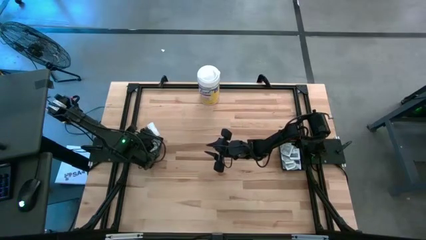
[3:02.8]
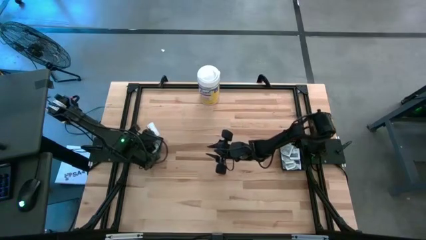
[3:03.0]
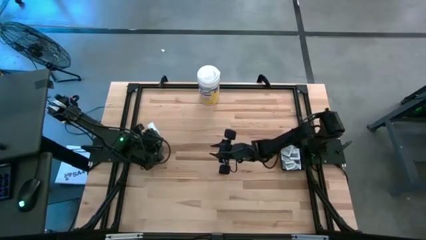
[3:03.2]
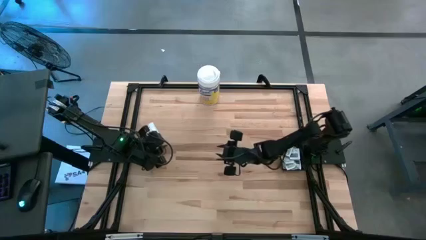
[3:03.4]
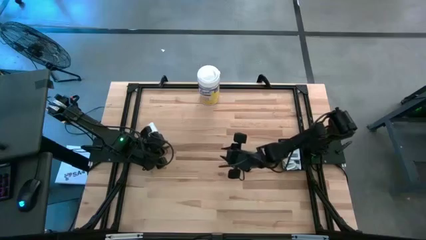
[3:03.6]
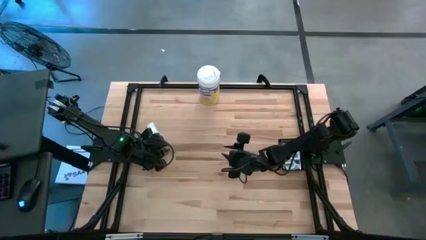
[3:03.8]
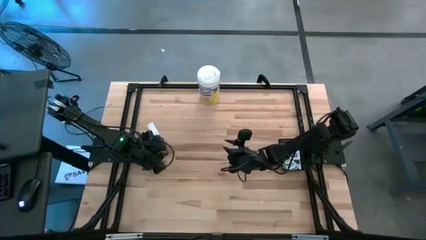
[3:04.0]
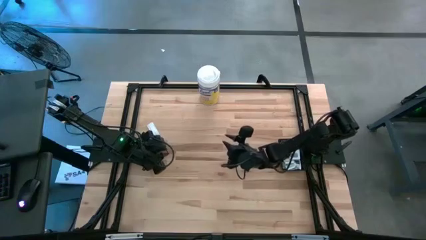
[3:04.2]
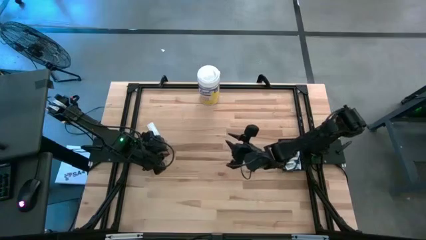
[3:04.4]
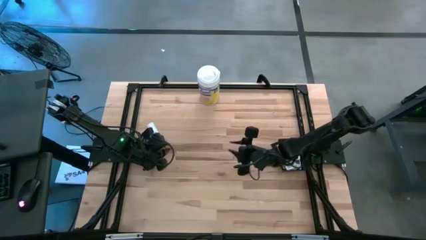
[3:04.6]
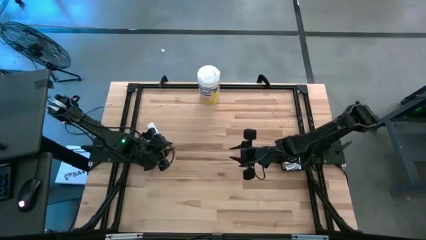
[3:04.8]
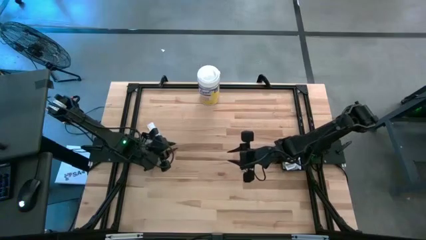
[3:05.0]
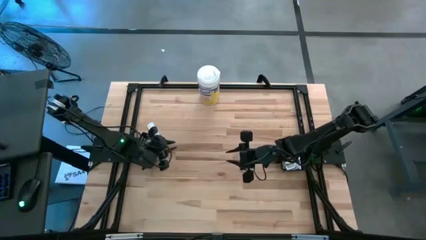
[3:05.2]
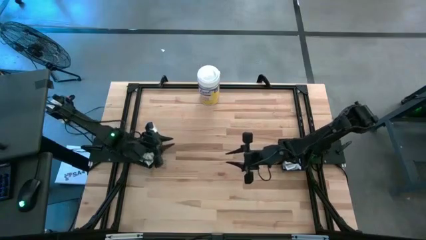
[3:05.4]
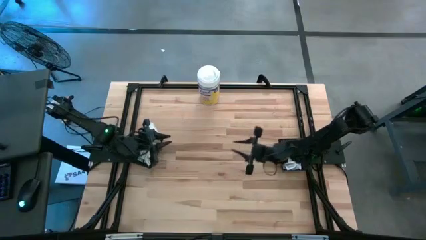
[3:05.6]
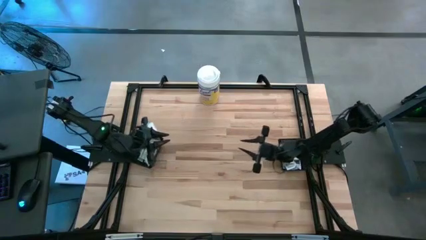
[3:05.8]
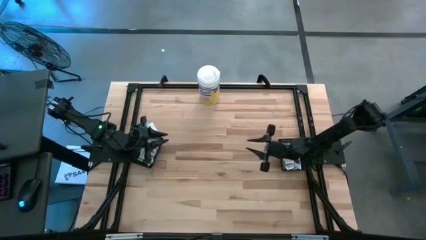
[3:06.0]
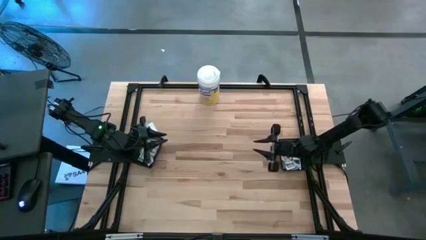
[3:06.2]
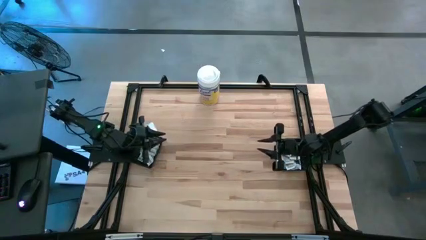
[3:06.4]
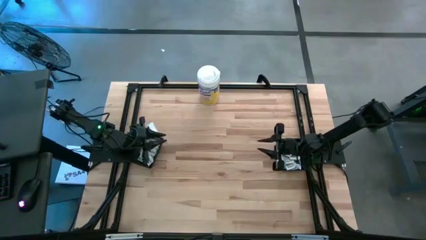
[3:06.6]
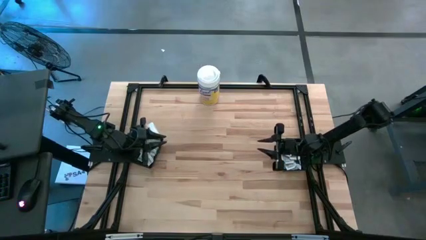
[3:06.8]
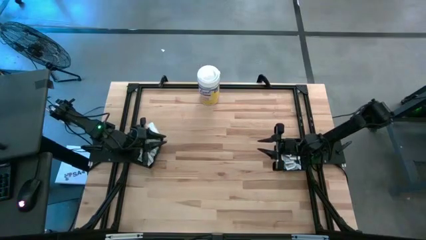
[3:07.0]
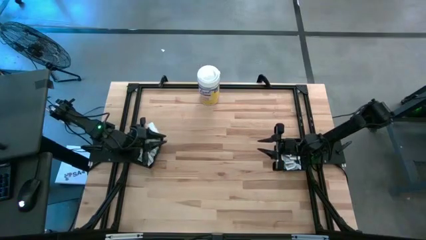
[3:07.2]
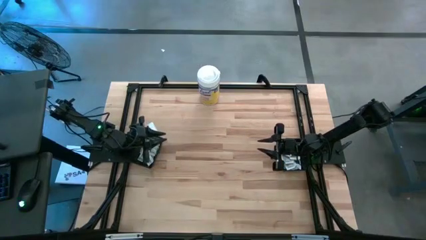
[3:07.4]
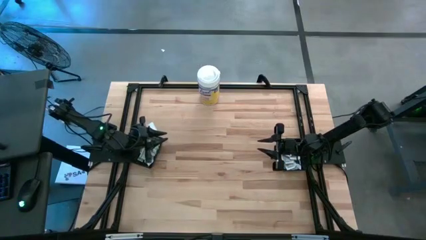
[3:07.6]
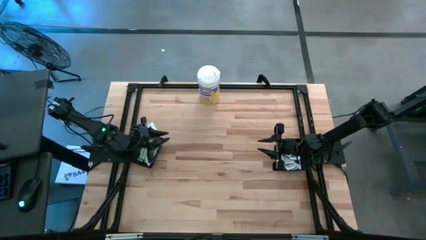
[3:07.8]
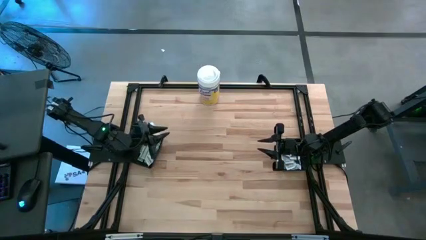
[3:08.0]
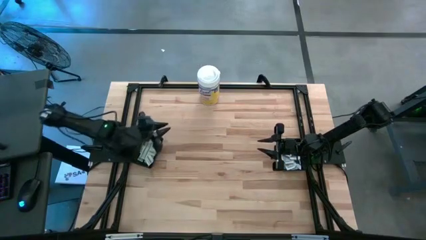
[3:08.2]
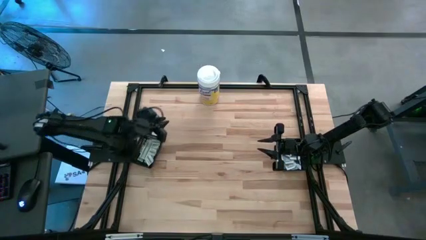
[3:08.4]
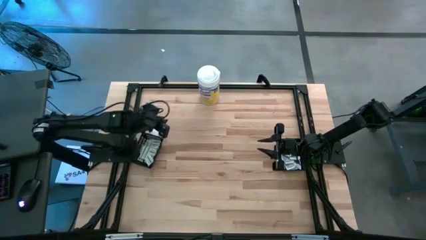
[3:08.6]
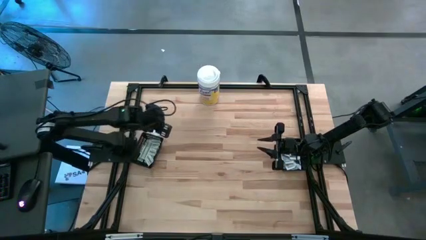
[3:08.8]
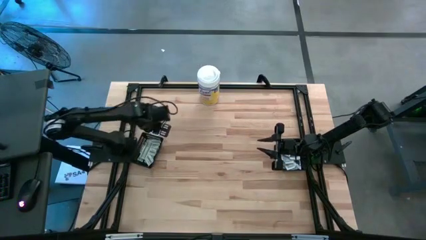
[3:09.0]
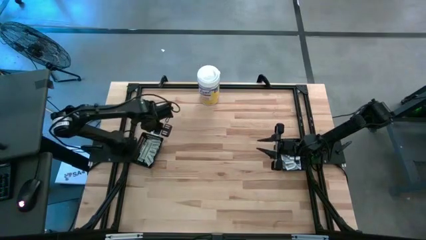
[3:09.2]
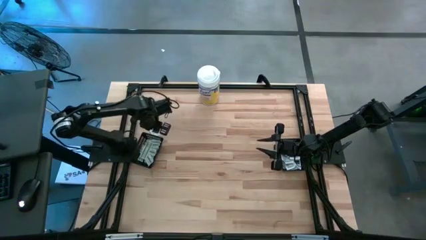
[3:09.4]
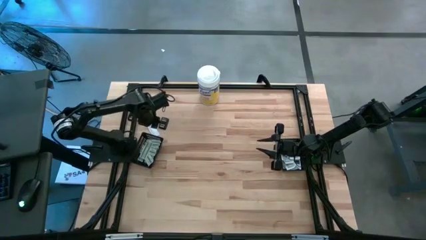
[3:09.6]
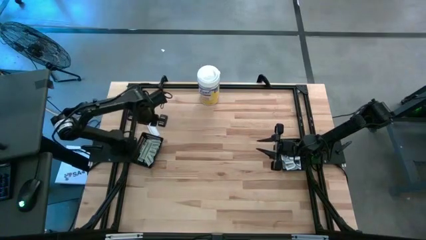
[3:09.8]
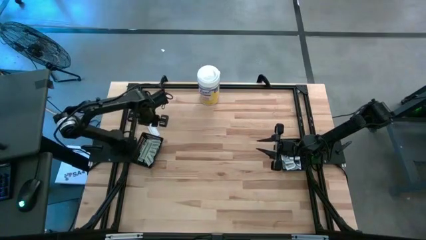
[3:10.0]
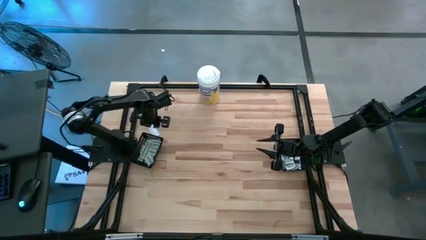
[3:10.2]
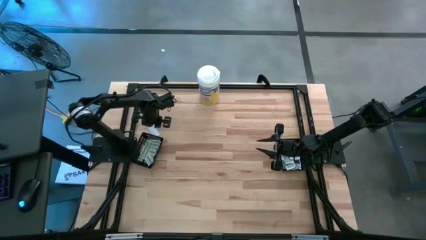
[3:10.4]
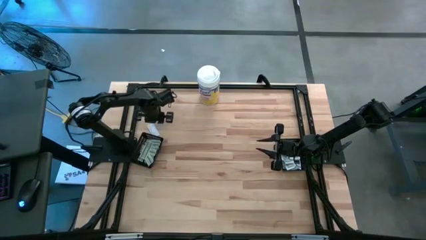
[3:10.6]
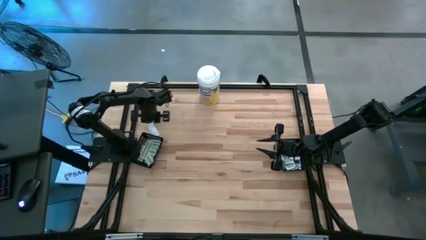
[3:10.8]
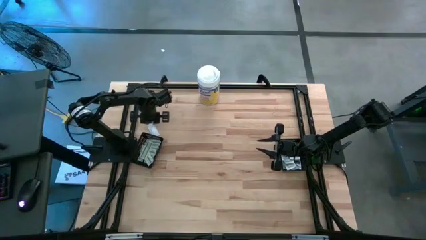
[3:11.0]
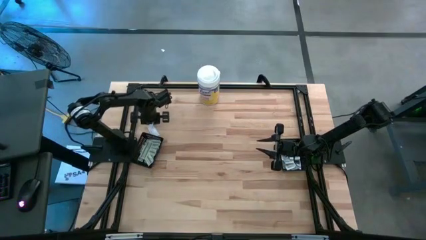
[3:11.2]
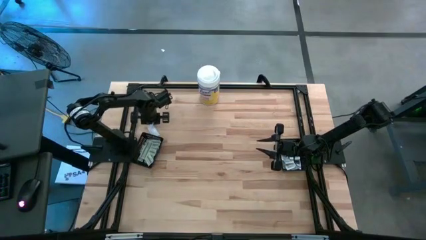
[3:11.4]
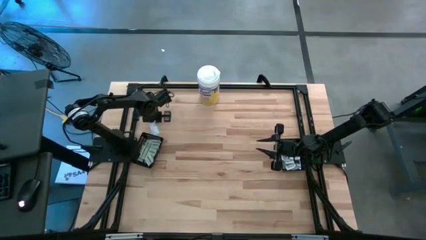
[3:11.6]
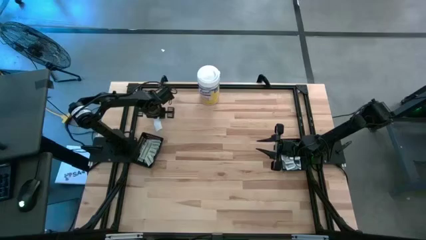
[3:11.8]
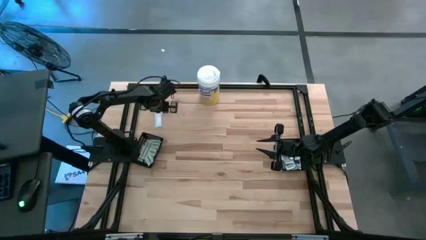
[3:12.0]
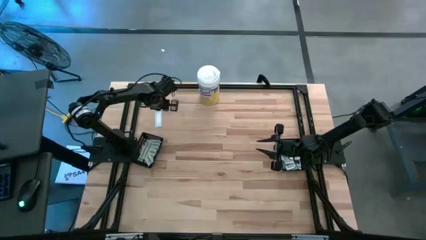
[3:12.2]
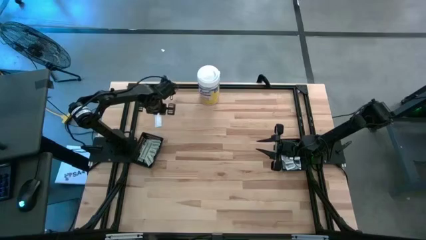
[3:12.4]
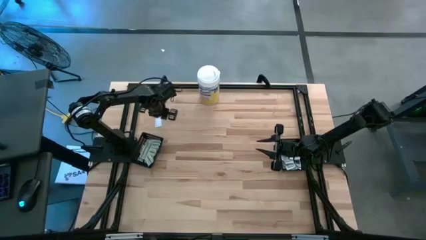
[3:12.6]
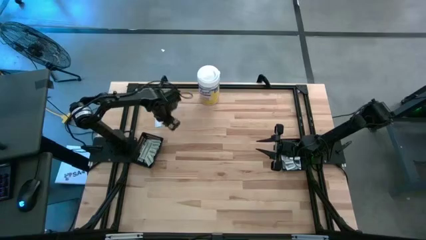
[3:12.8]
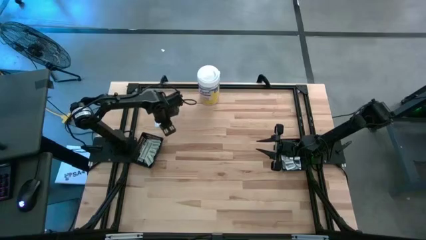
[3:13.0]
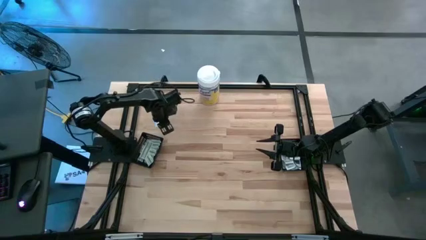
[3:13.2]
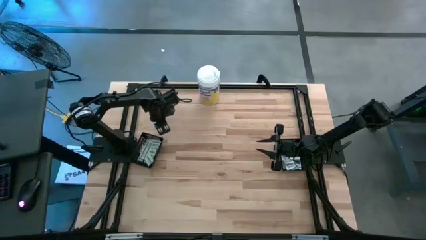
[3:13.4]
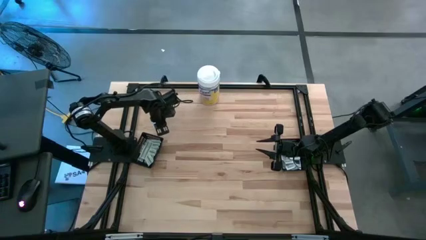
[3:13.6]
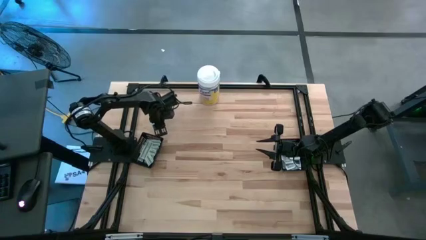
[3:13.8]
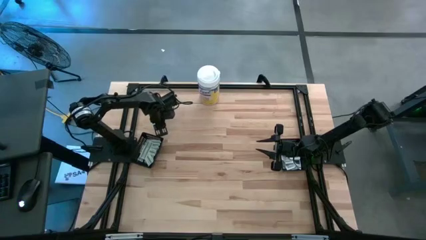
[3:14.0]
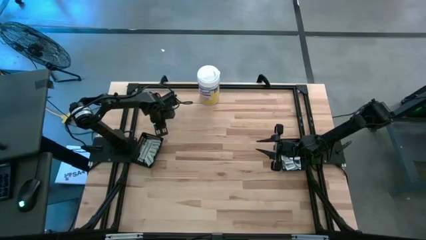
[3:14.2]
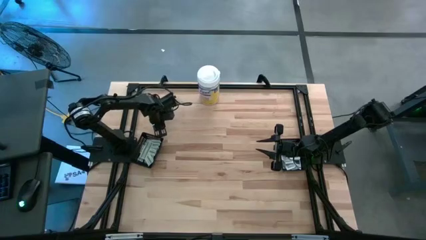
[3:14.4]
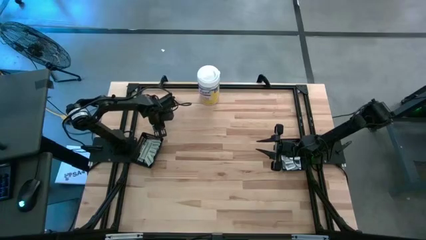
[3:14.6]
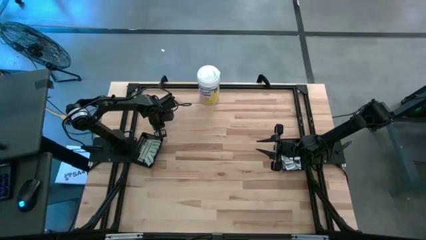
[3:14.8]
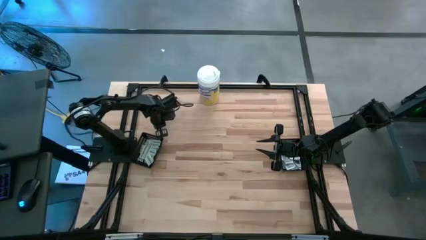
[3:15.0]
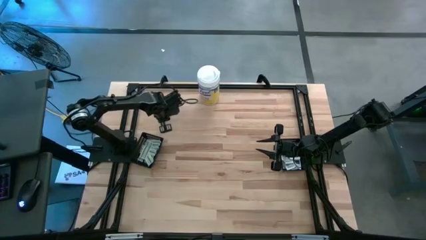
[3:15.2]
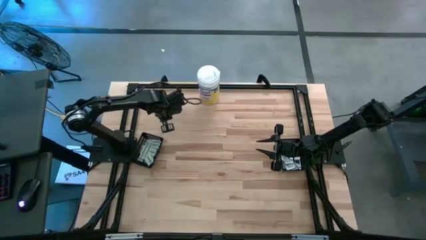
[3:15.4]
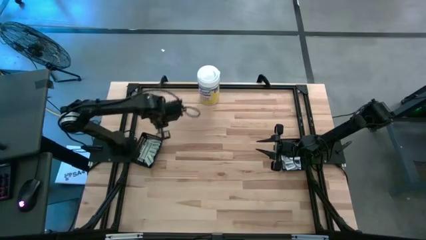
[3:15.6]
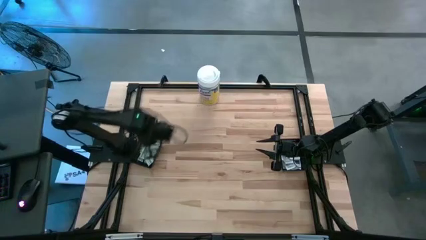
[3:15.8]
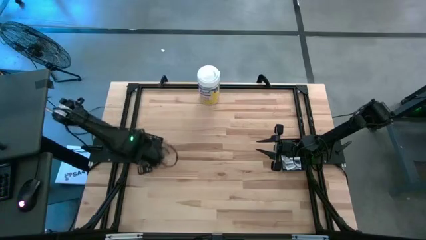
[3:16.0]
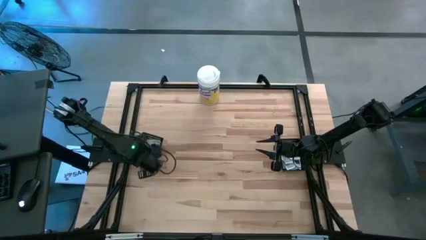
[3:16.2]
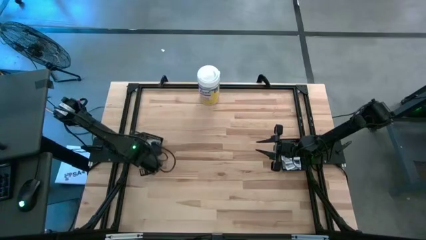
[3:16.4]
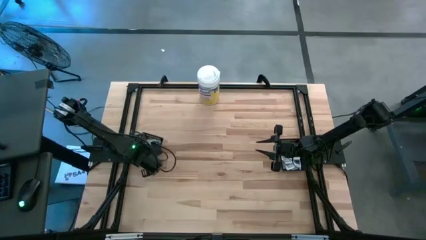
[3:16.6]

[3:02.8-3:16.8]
Task: Pick & Place First Aid Supplies
Put the bandage into the left black basket

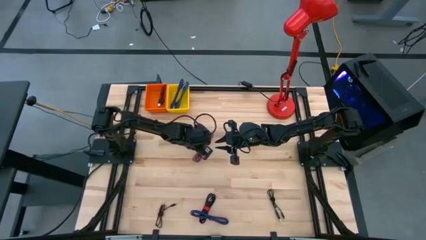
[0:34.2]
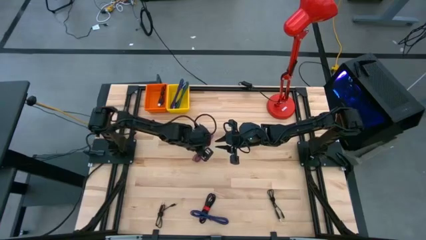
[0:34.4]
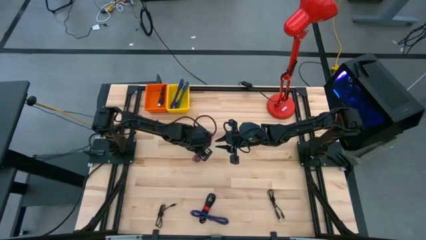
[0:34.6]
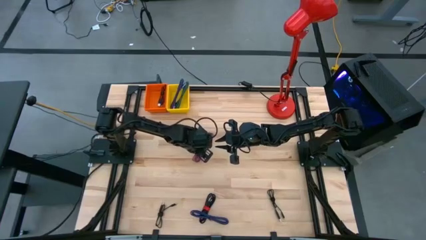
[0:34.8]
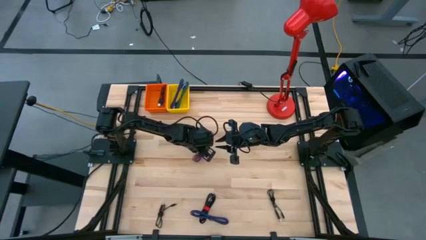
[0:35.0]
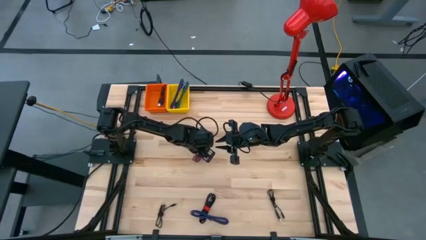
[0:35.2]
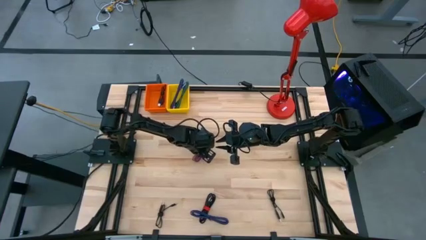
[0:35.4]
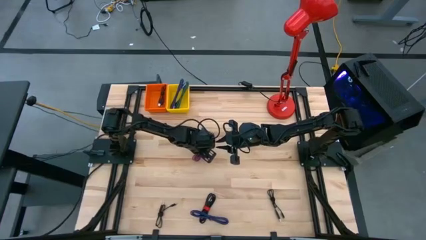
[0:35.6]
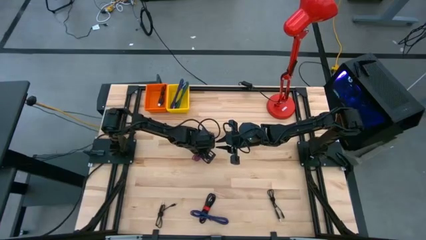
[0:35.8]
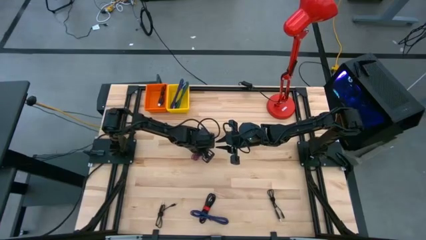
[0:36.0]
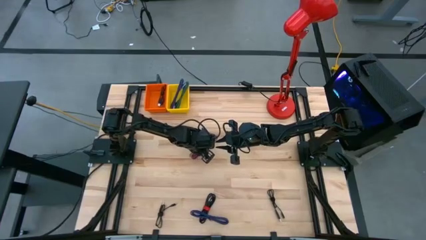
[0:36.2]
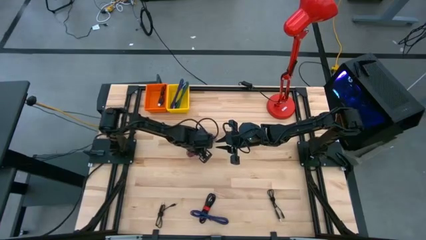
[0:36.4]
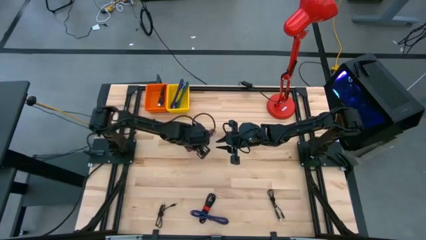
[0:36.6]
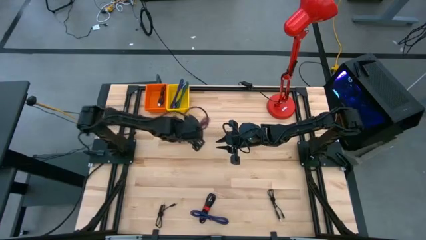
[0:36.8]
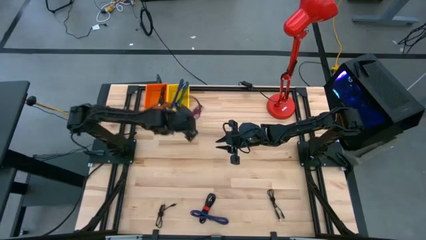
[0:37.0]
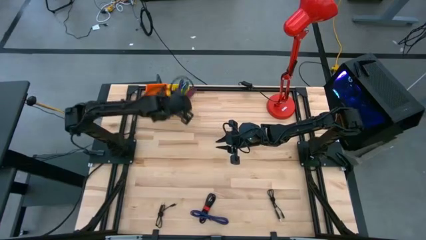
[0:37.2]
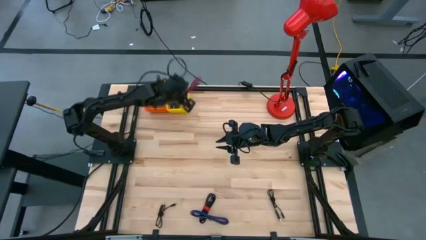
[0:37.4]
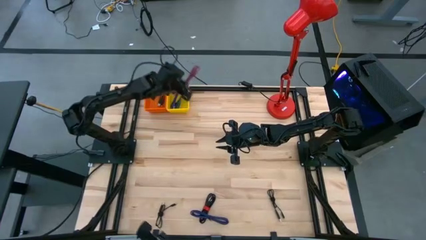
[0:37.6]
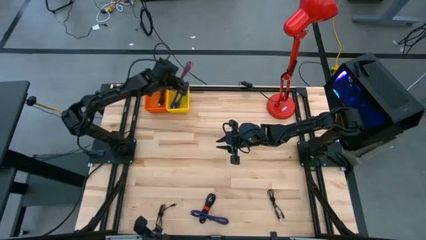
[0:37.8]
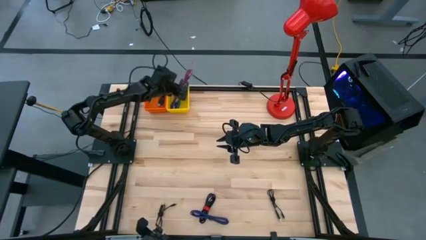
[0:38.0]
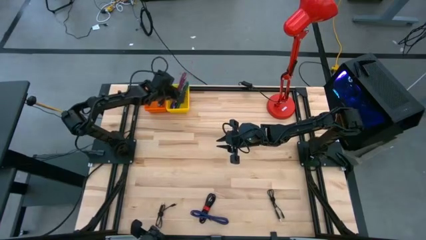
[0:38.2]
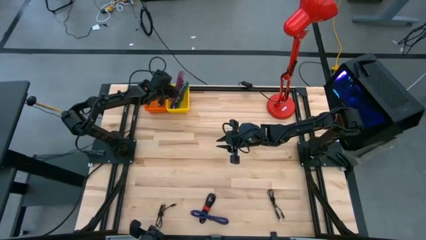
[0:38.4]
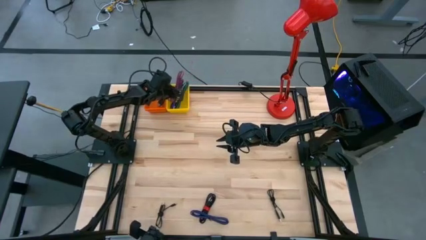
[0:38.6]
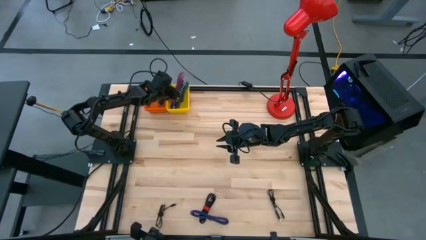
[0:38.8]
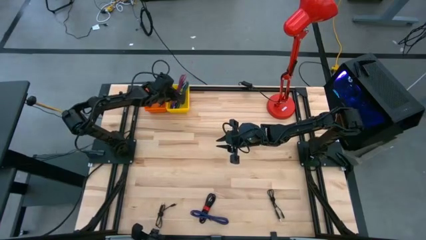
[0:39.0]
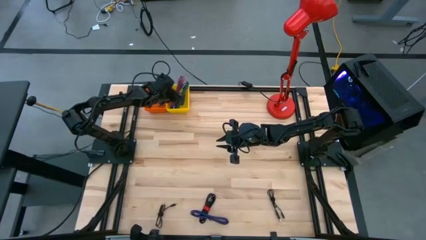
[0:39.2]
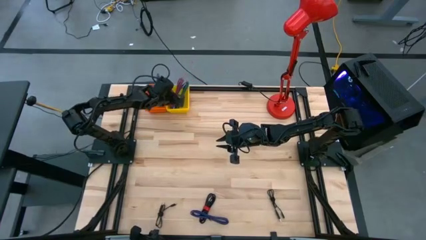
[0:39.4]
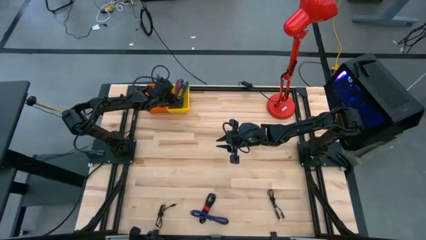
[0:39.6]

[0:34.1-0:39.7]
Task: Pick & Place USB Port
Put the black and pink USB cable into the yellow bin
